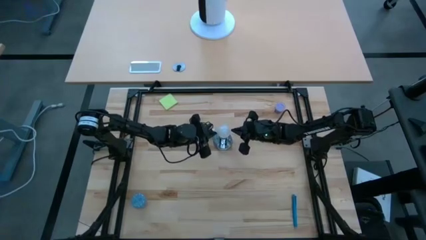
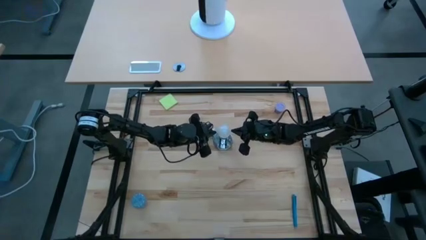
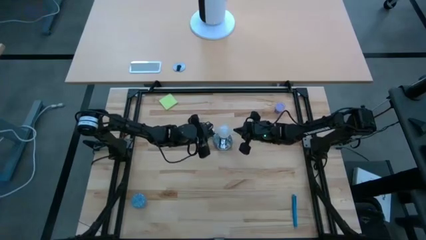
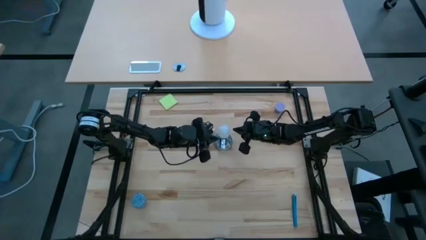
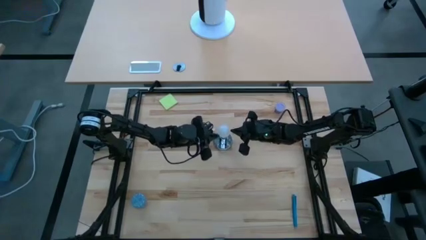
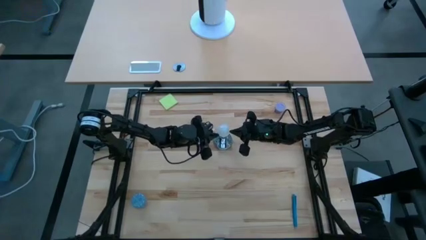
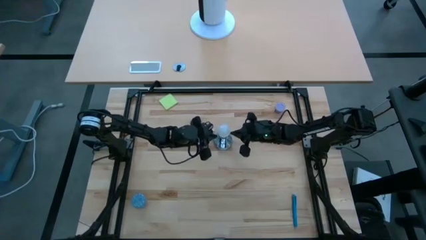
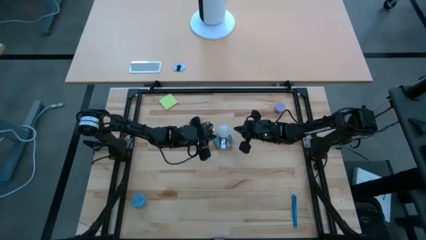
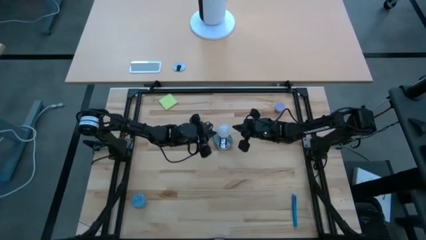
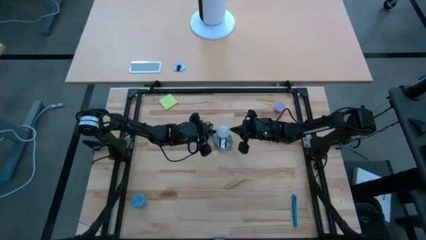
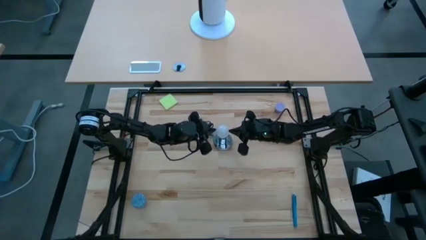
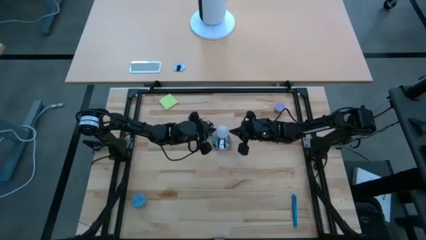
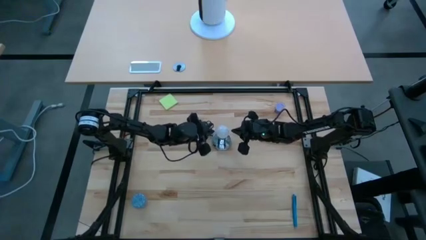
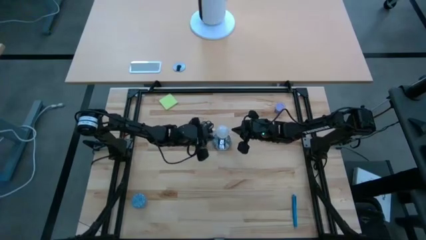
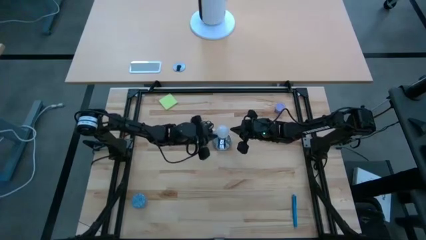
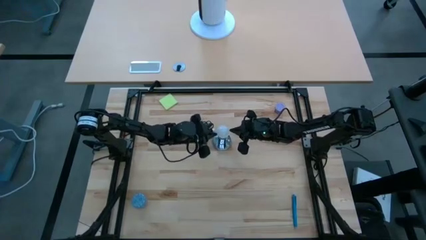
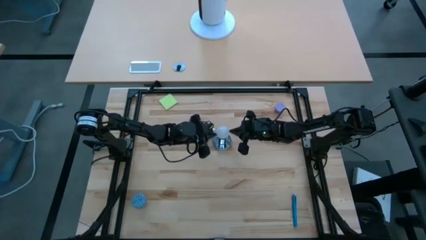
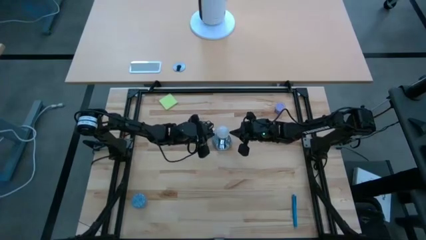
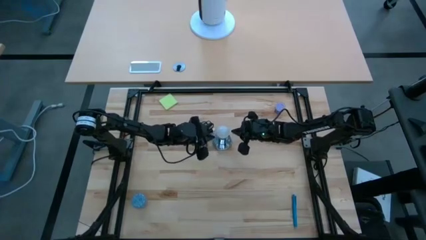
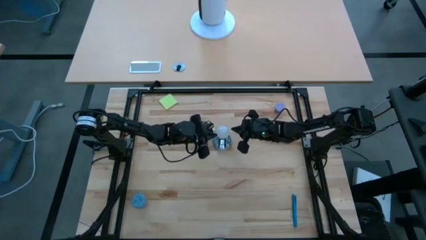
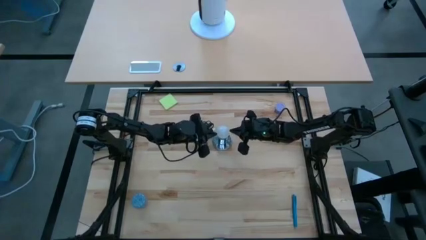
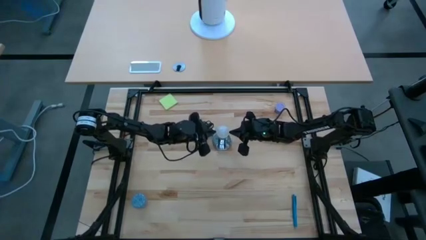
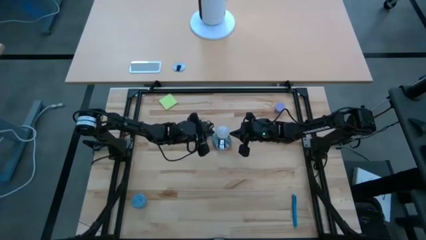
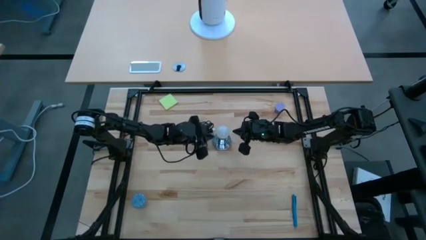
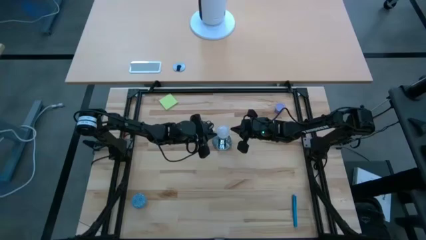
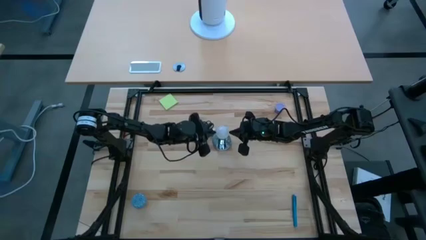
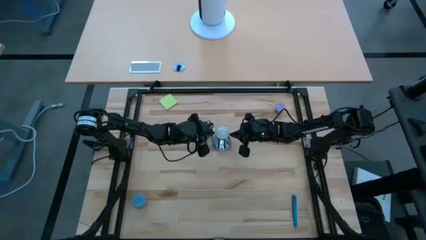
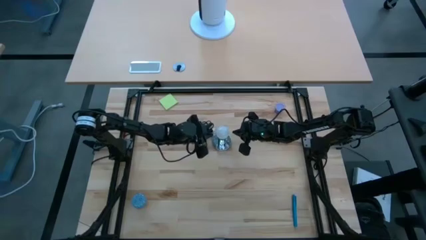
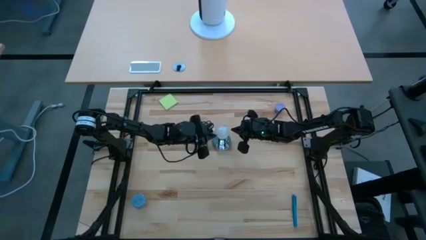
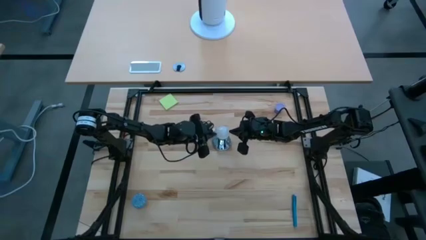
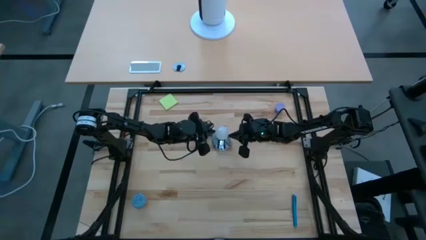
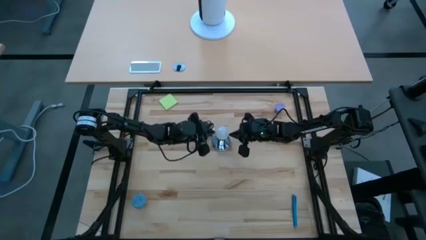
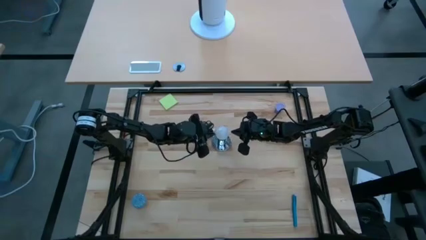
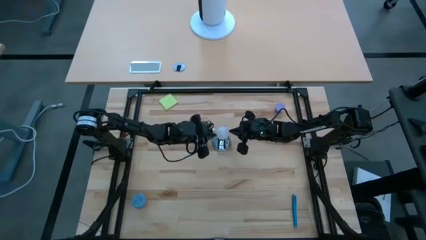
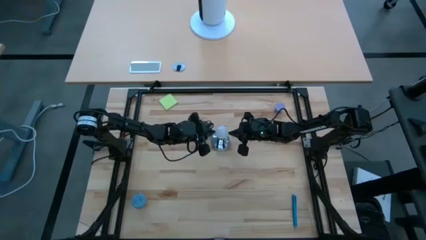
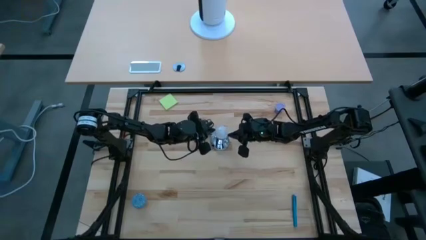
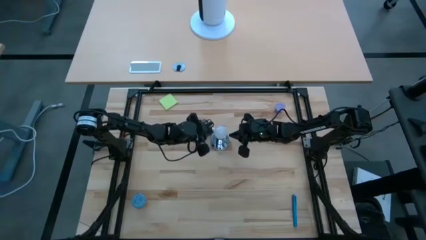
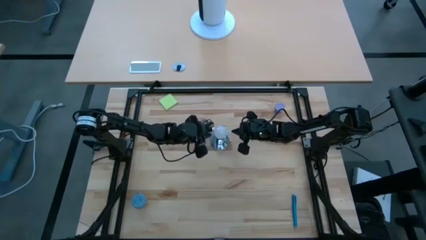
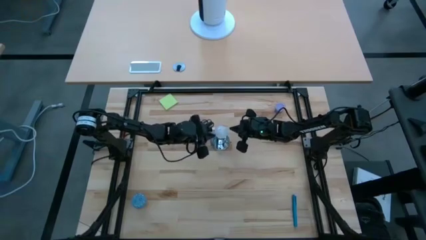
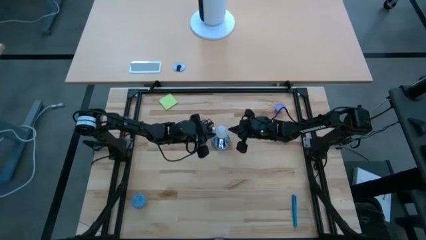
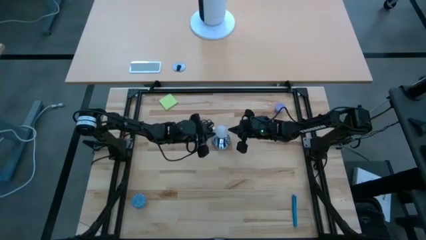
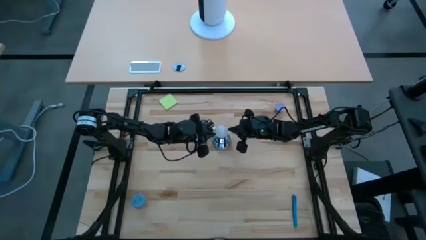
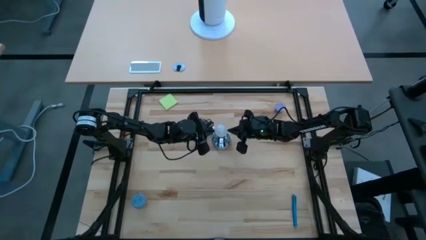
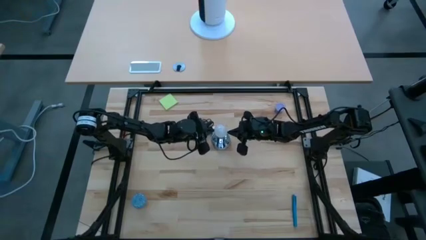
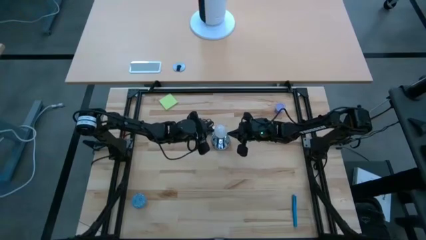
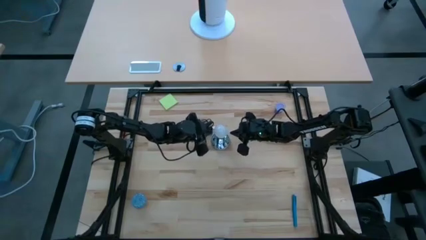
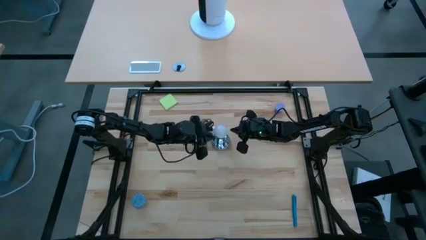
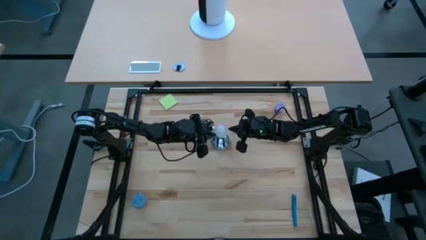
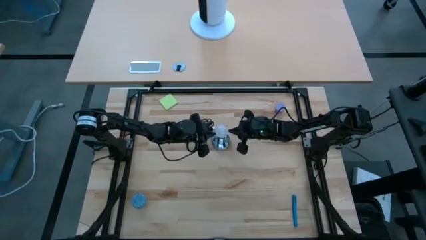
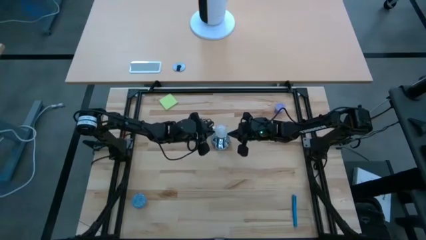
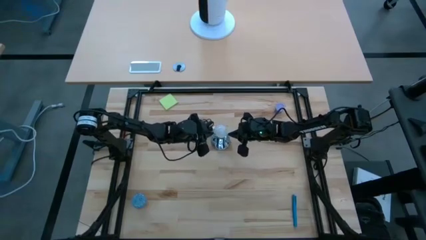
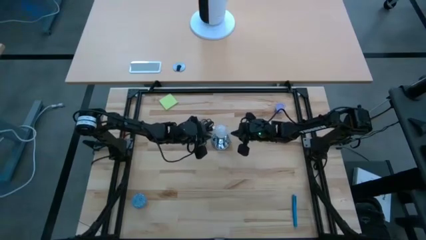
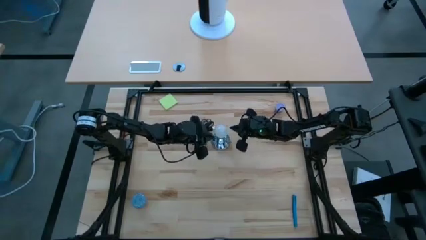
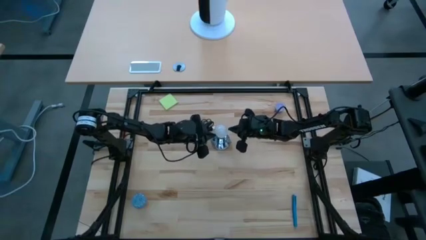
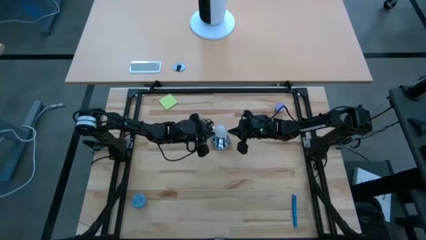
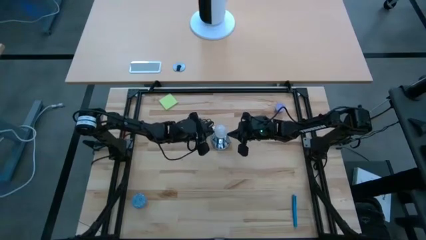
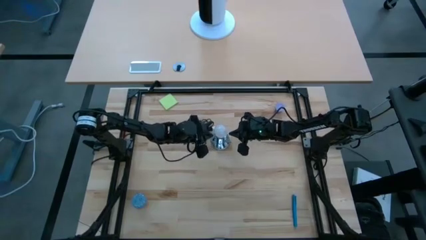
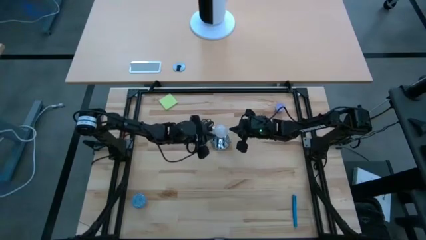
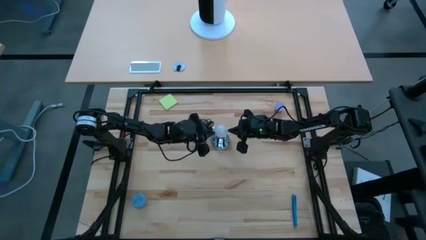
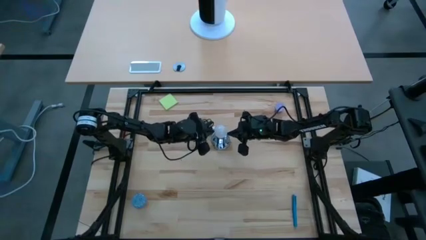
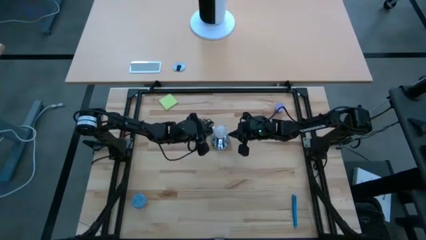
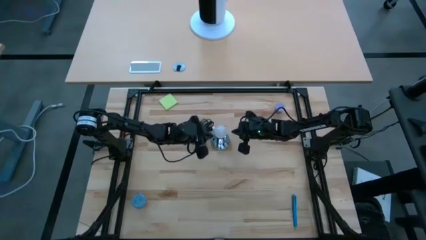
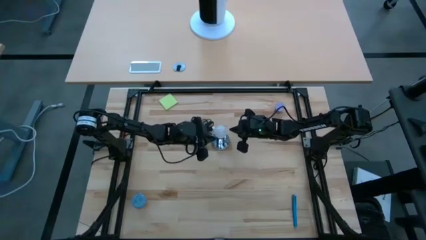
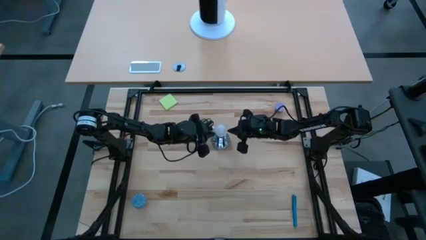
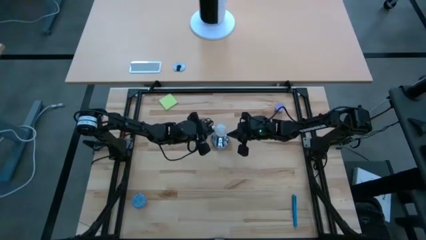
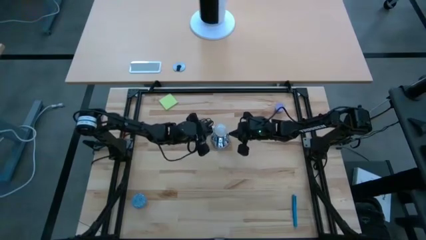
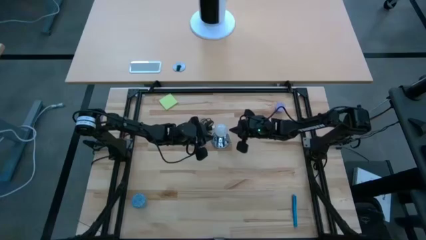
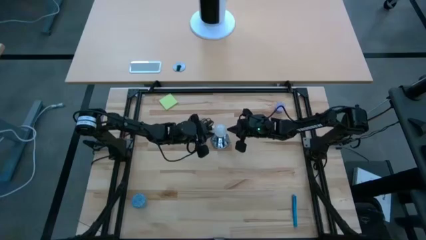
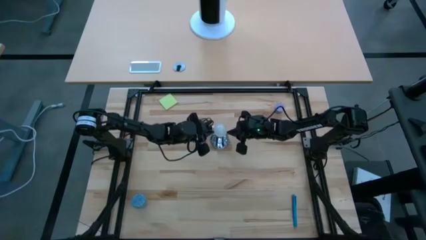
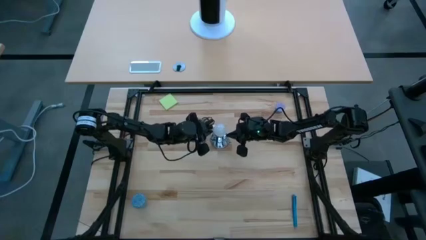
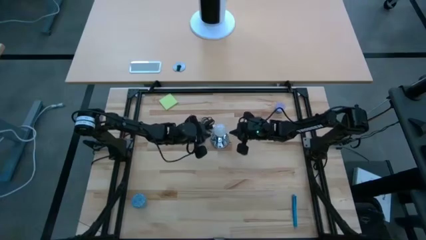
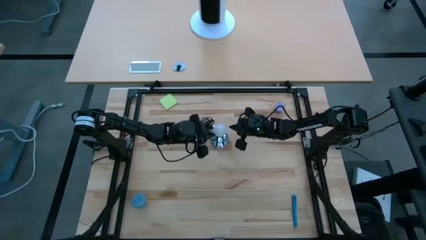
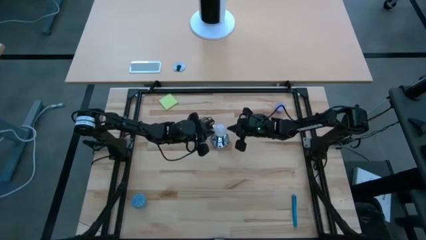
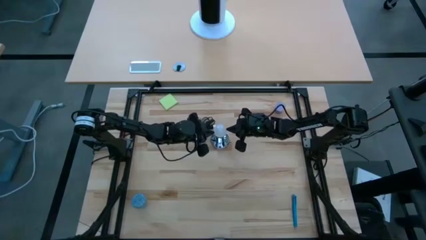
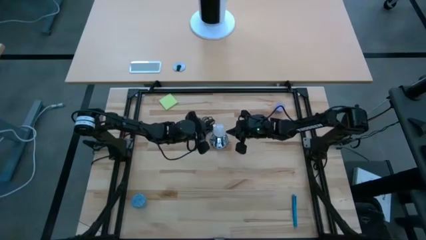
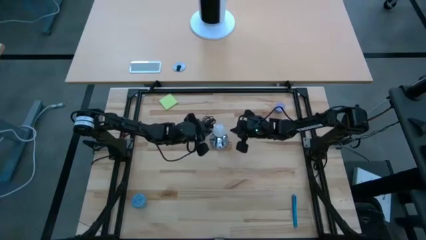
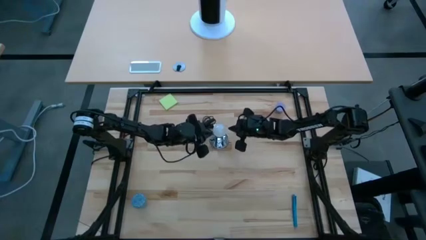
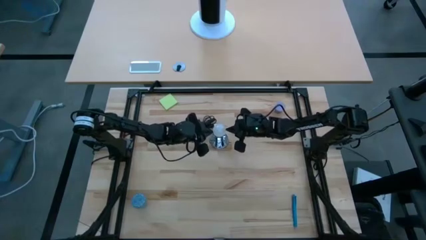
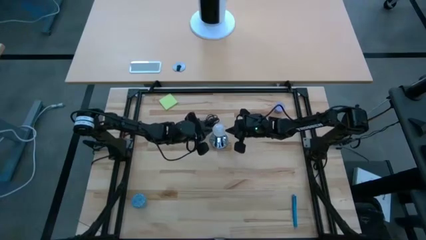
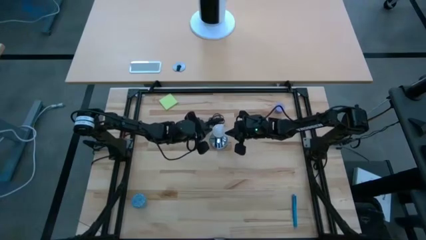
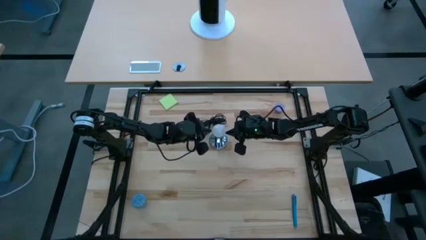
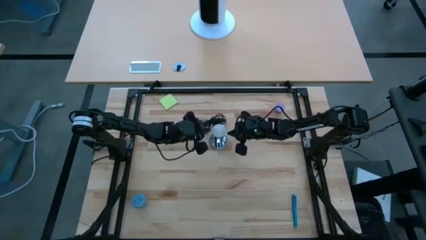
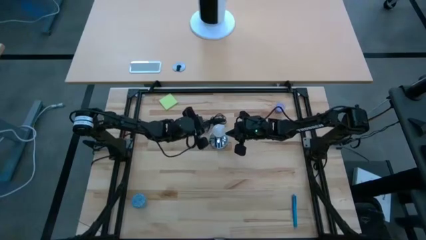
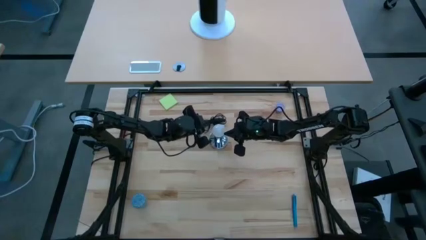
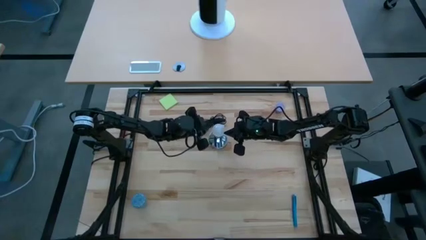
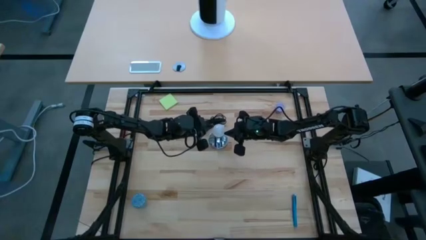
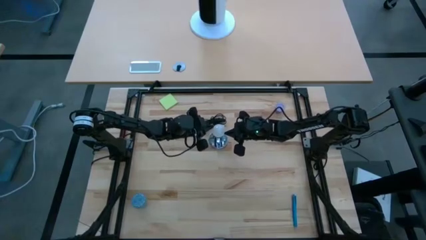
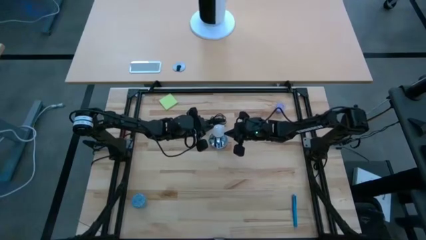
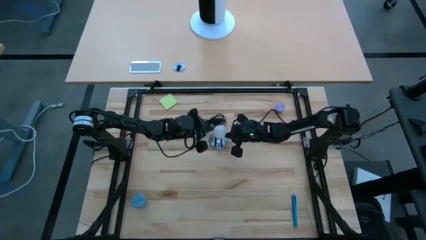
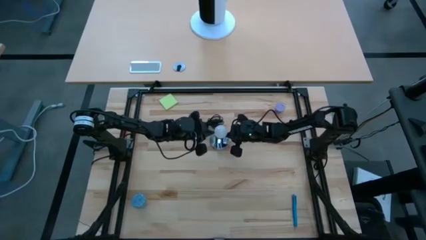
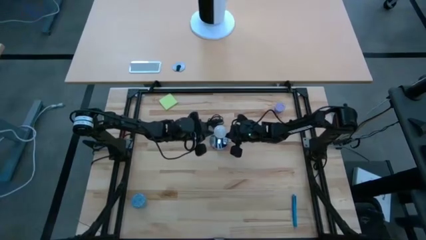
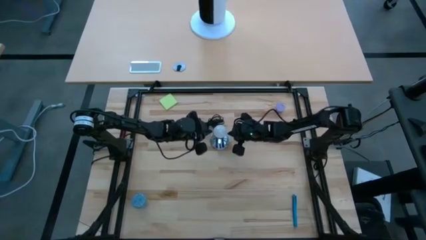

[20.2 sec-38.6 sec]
Task: Screw lightbulb
Insert the white lightbulb into the silver lamp
